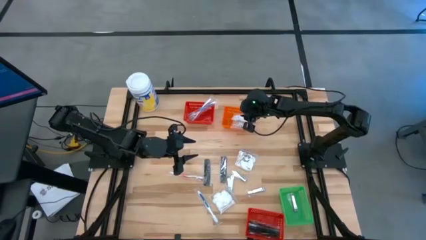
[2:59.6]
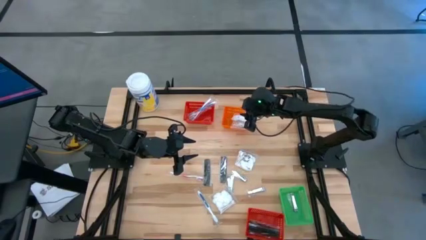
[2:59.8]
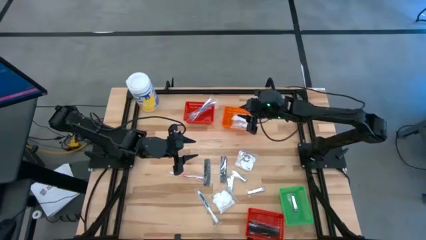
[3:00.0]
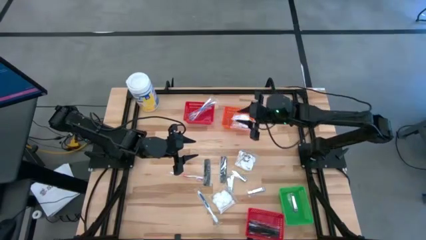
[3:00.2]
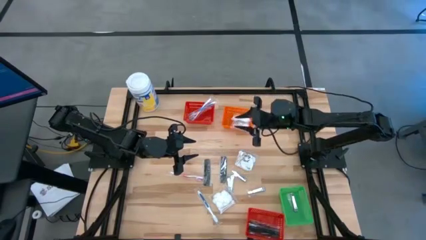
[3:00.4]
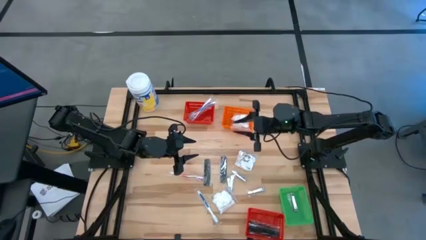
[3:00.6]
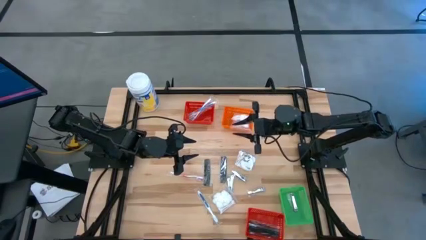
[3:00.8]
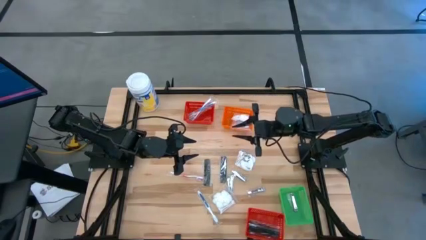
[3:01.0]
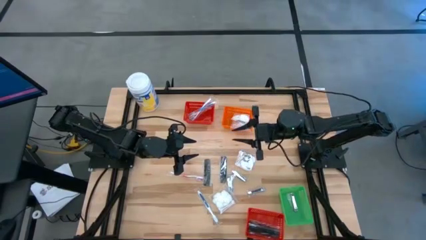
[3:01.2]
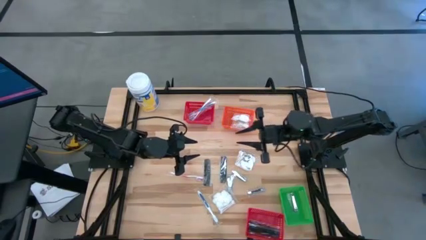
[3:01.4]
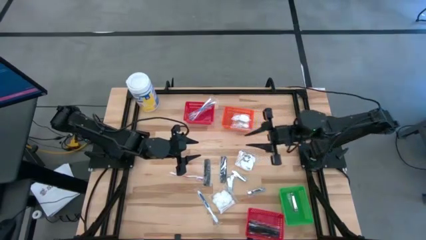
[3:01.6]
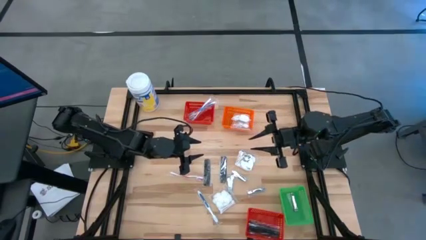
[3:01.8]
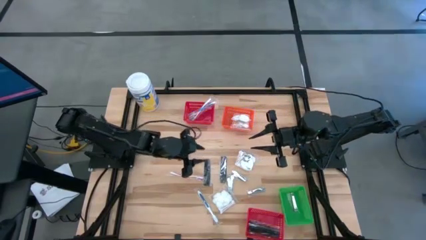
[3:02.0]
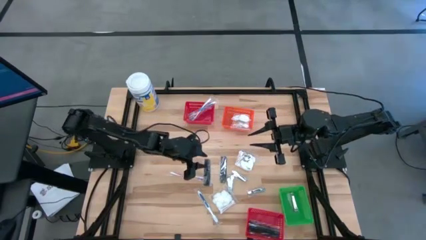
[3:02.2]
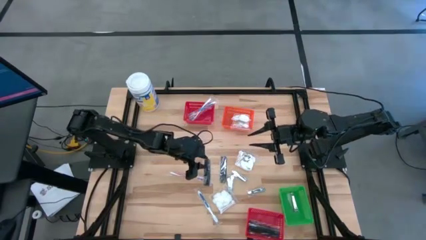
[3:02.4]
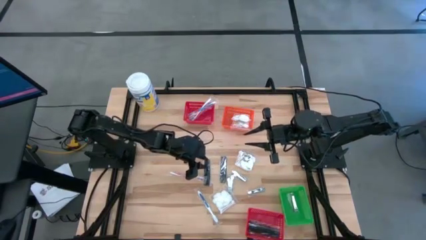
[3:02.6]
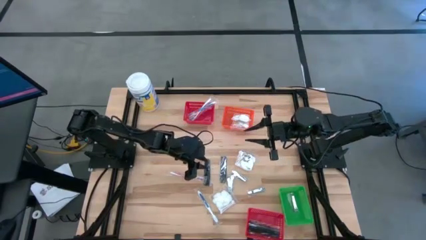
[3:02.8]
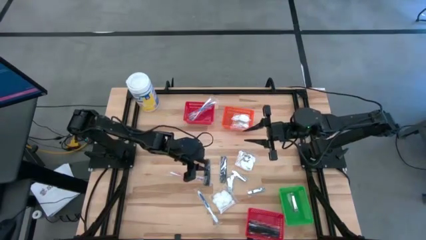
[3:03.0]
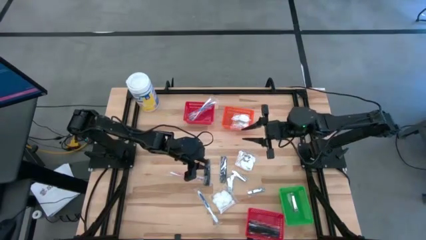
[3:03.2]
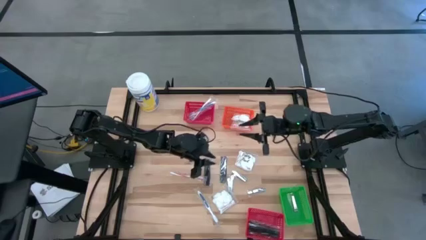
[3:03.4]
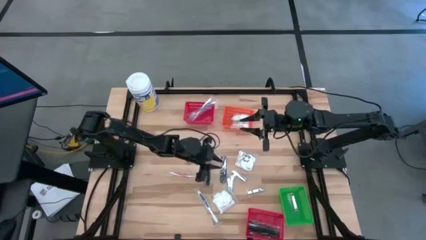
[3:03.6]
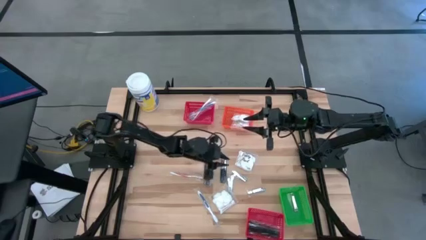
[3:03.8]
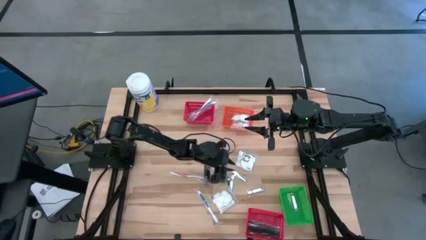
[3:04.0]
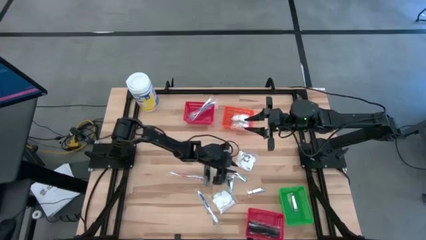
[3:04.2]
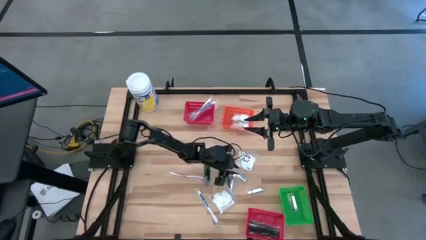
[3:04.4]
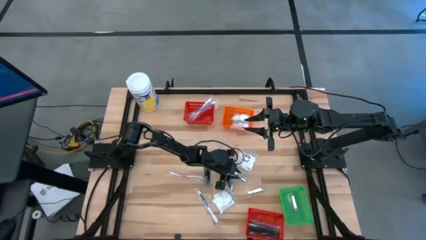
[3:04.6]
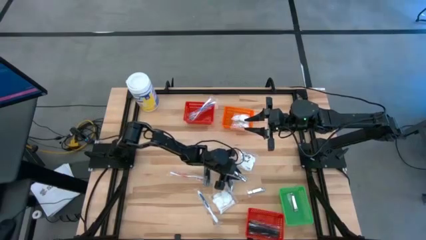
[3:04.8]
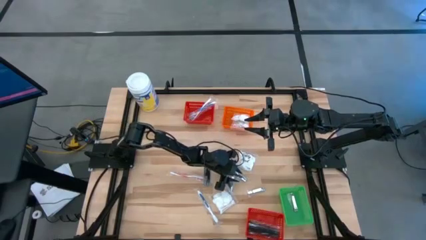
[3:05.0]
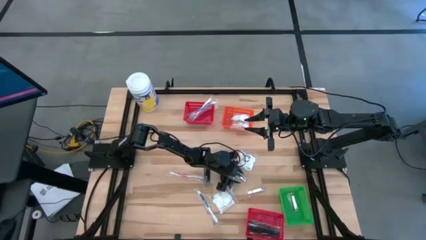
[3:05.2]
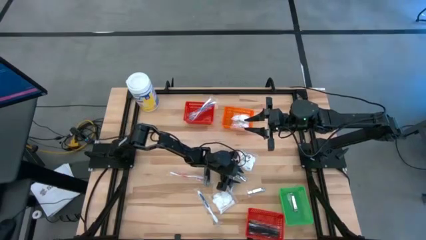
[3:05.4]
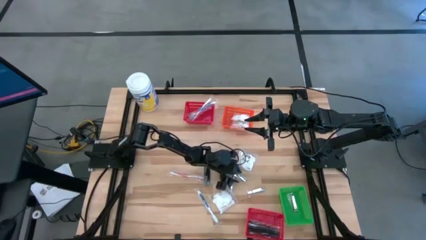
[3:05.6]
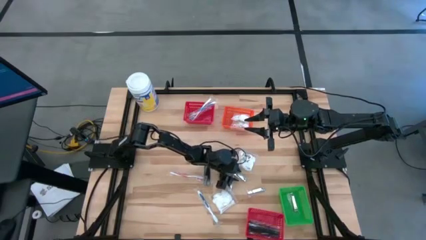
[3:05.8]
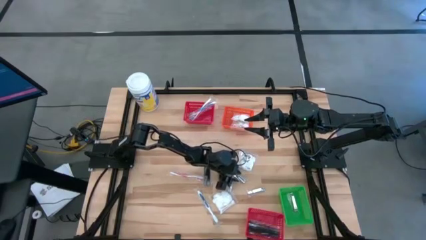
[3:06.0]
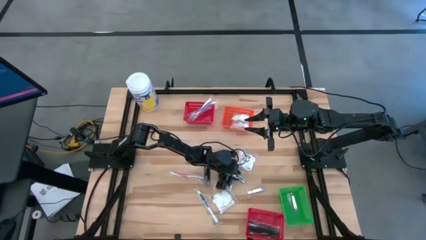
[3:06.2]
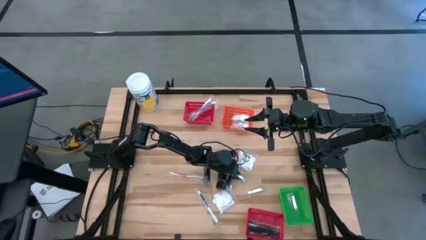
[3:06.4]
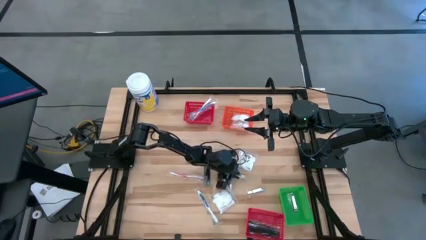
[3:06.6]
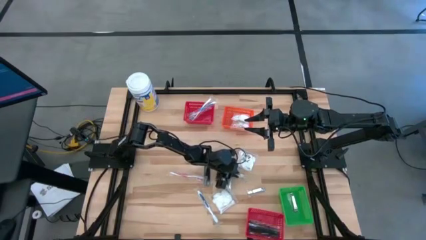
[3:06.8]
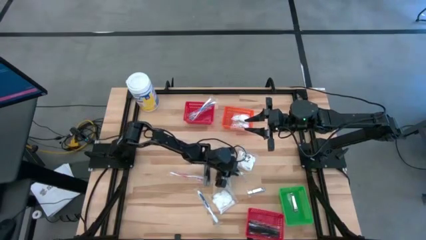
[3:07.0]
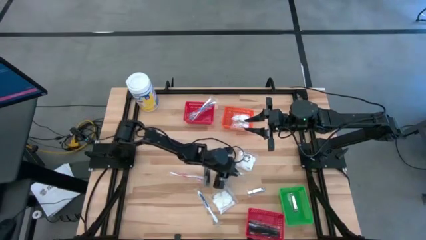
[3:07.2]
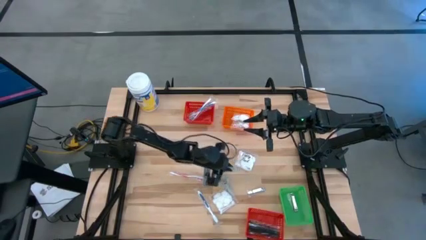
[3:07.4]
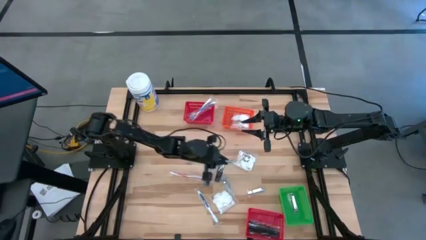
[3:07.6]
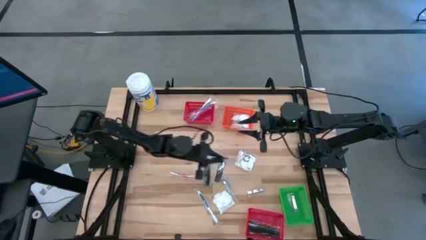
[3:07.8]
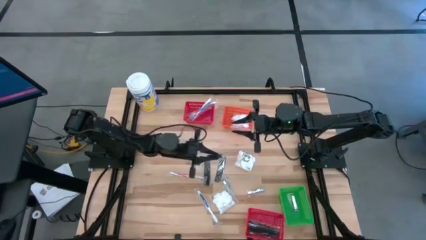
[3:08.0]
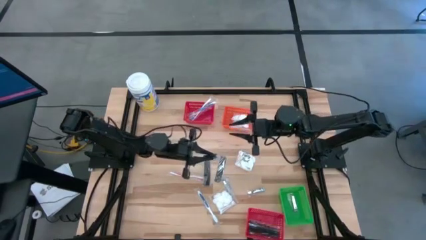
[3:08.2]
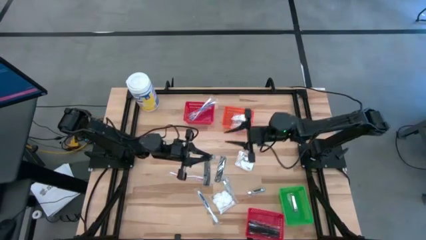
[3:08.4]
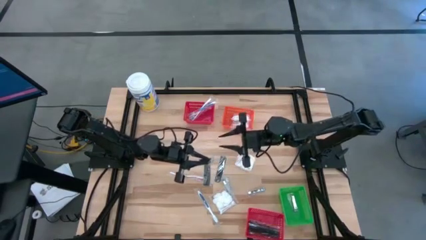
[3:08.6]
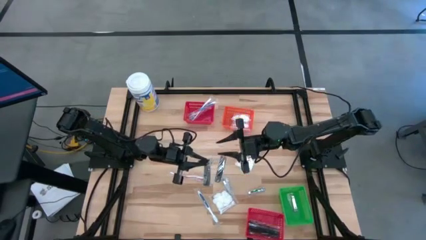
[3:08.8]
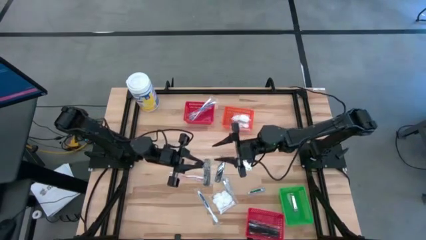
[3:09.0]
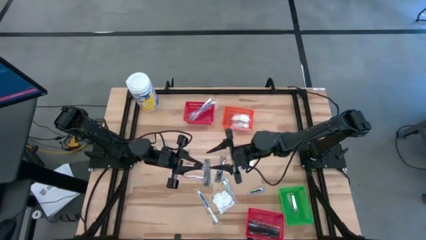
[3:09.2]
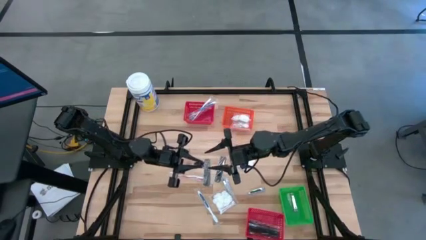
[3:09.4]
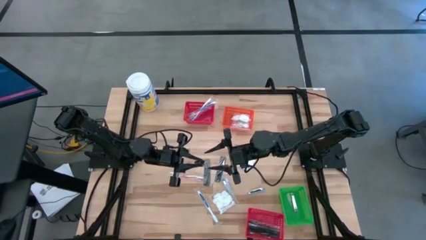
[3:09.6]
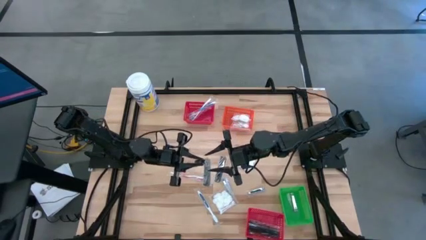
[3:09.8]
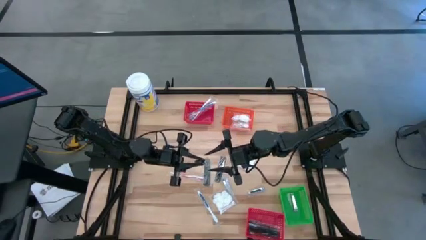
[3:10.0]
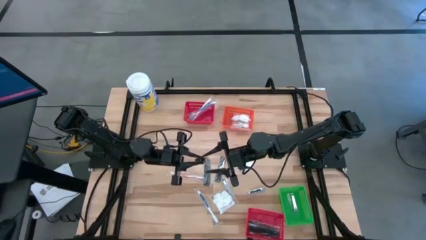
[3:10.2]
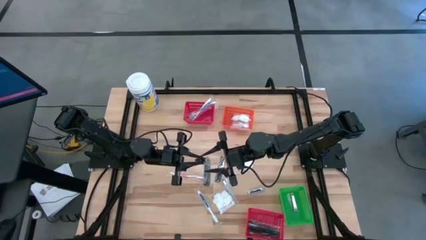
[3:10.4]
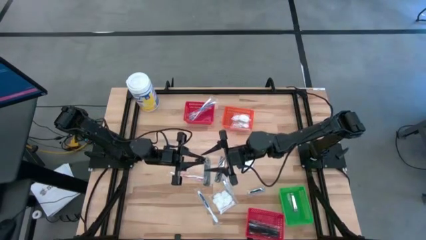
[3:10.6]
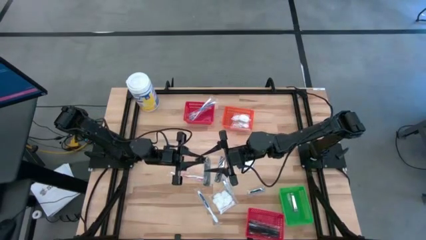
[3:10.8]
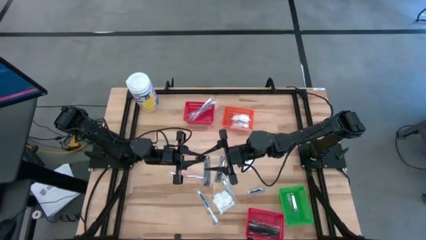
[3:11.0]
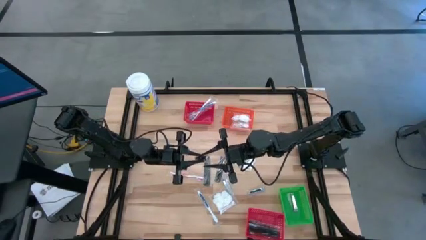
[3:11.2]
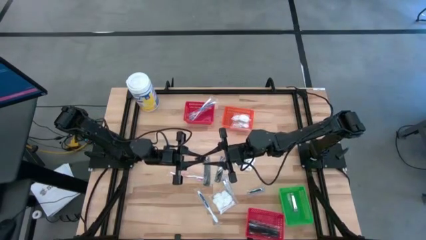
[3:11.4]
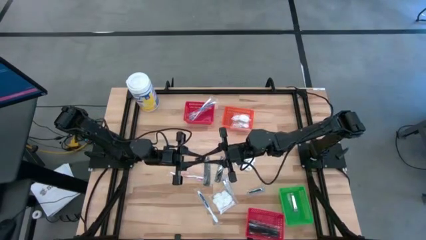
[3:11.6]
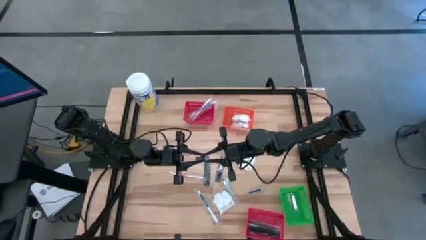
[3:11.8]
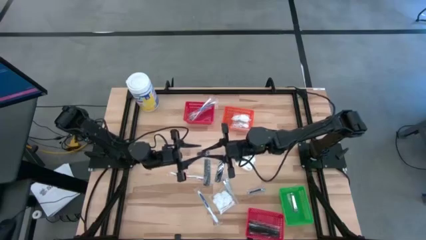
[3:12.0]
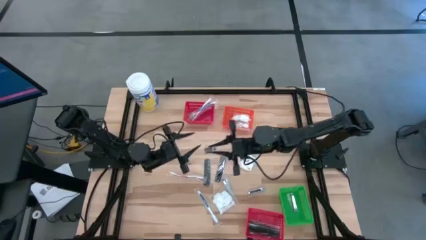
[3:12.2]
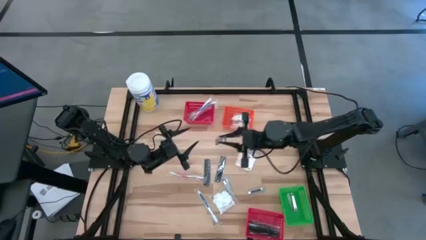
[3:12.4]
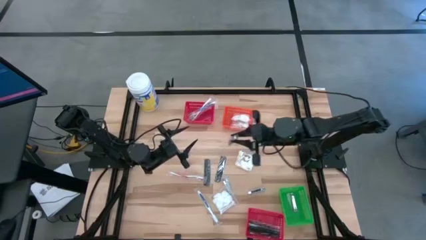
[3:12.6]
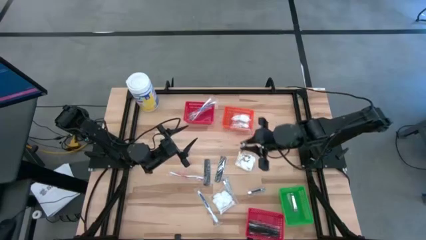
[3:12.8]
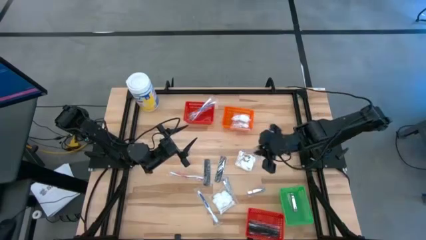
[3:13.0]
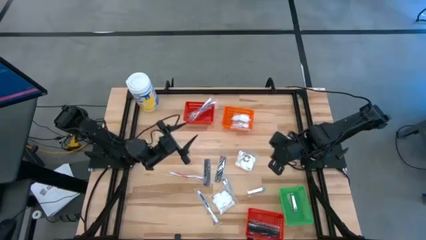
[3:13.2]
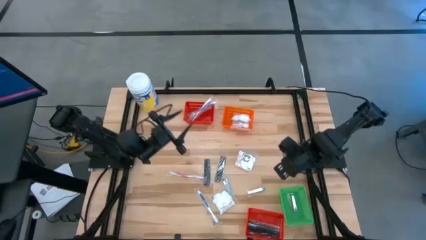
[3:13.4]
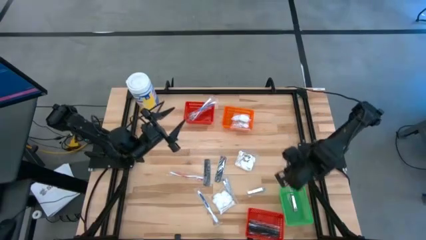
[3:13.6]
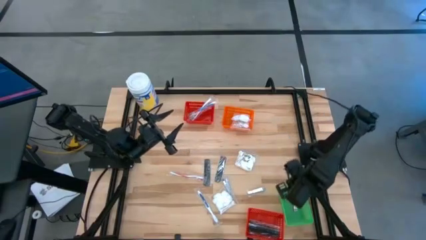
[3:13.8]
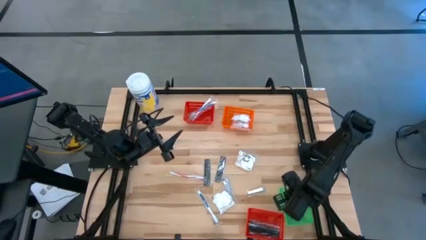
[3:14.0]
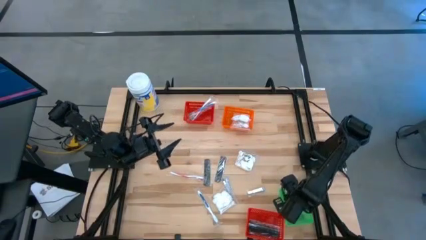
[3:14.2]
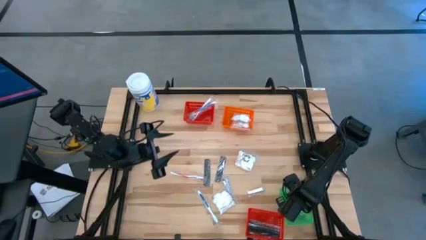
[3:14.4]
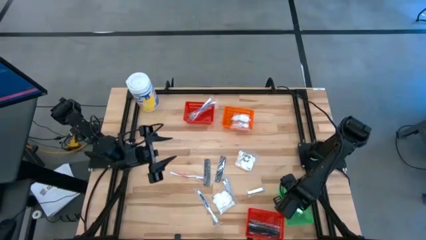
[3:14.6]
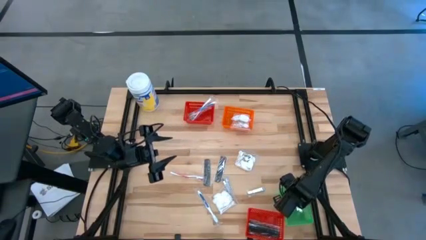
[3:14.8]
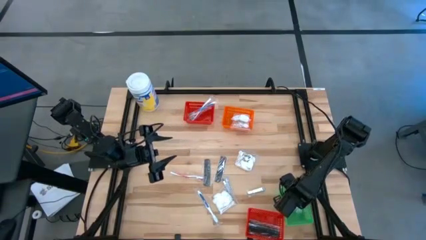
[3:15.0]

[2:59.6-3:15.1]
Task: Pick & Place Travel size toiletries
Put the silver nail cutter into the green bin

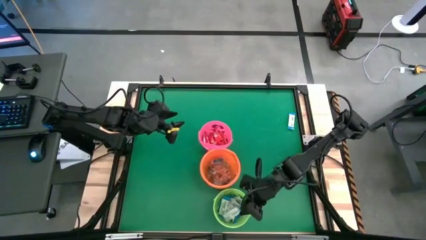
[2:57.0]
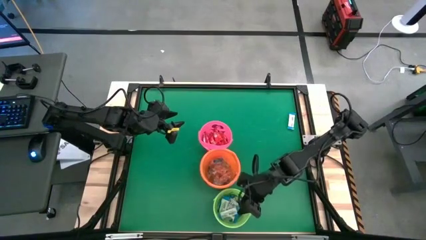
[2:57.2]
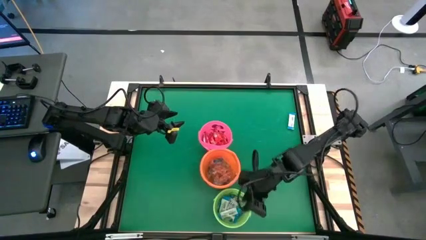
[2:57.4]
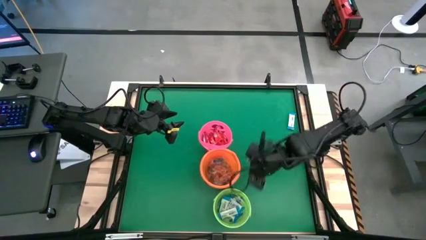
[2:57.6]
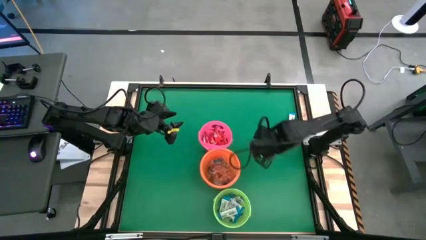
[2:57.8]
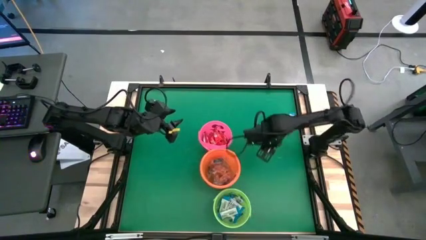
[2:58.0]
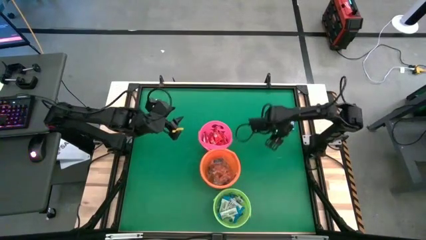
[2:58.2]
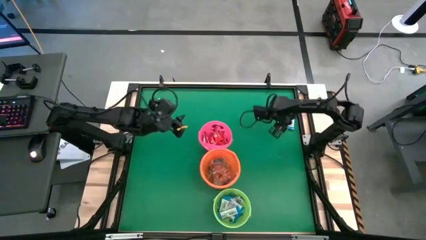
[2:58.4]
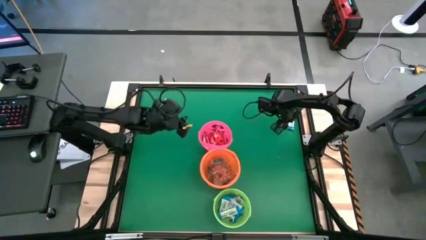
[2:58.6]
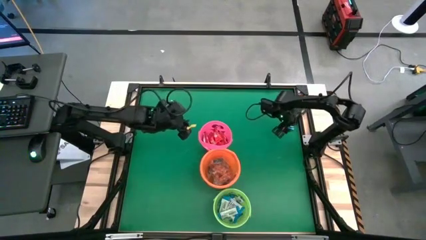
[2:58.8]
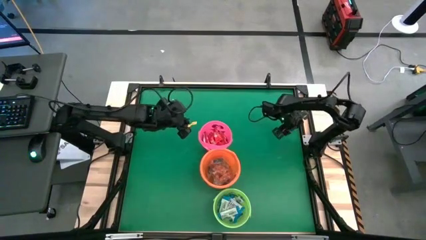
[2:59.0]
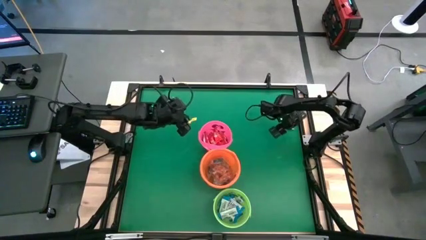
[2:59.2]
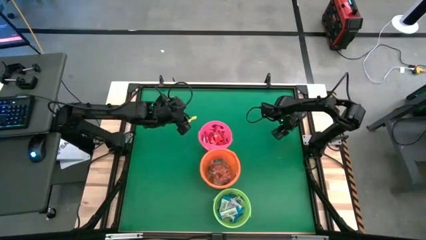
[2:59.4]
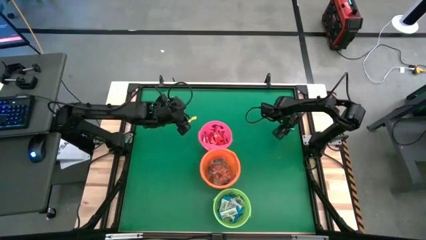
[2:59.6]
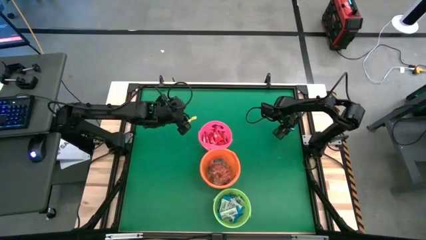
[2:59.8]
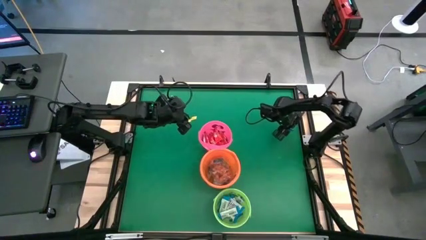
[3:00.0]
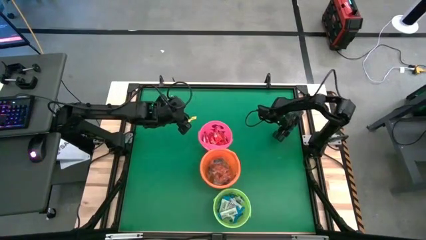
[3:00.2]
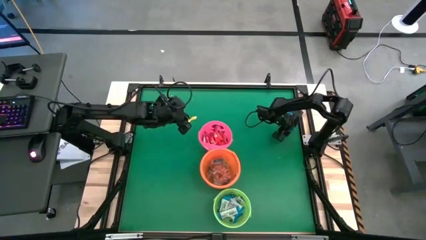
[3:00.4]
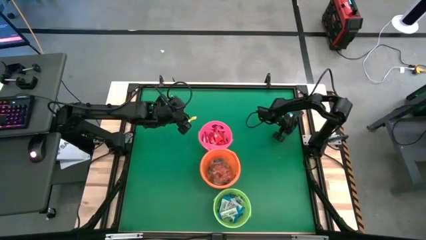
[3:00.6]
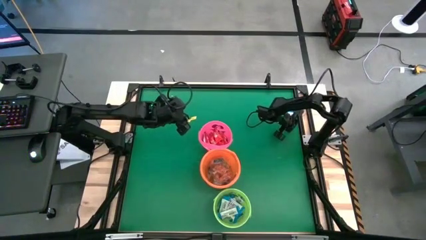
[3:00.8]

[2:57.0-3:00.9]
Task: Sort candy by brand, put in halloween buckets
Put the white chocolate into the green bucket
